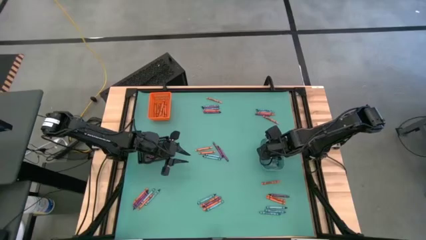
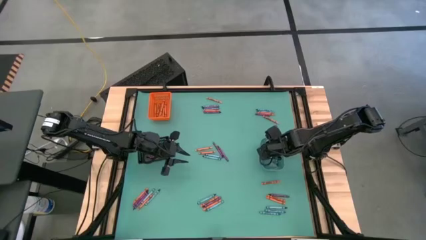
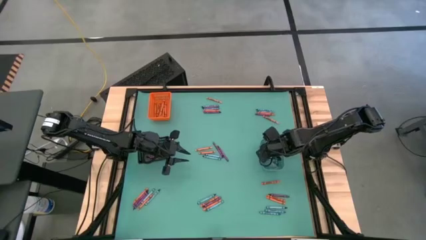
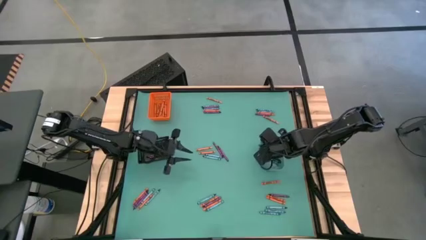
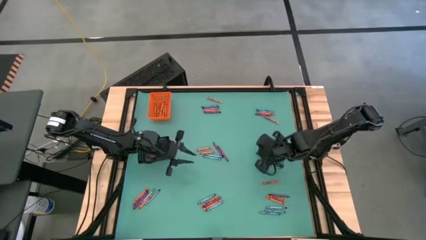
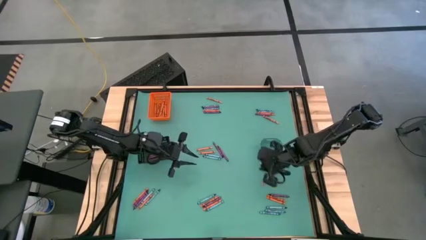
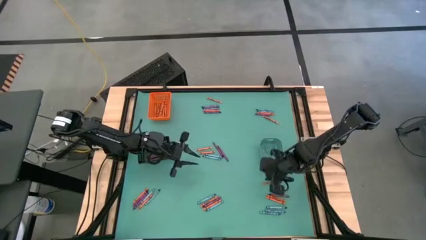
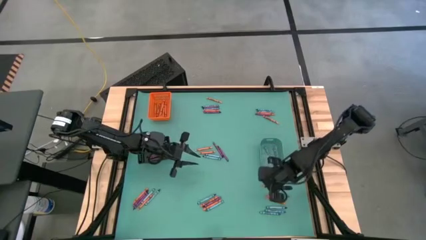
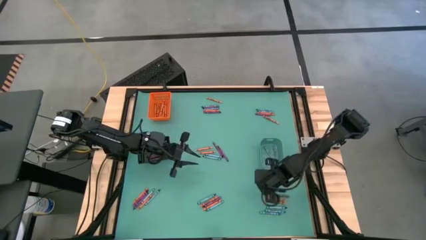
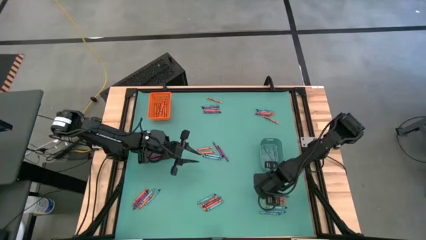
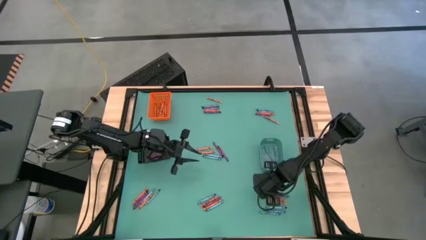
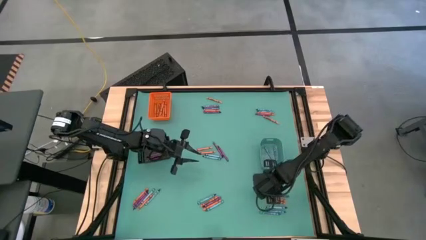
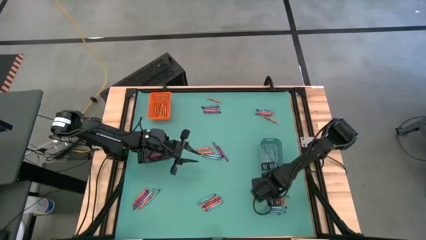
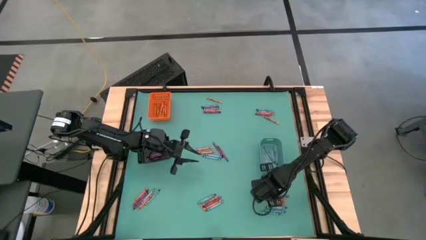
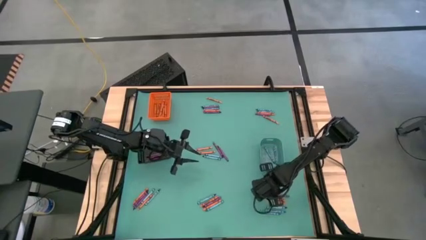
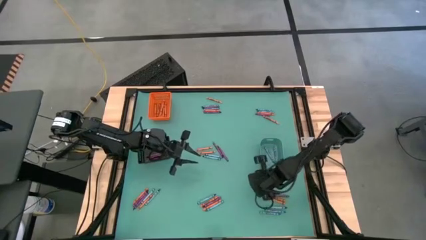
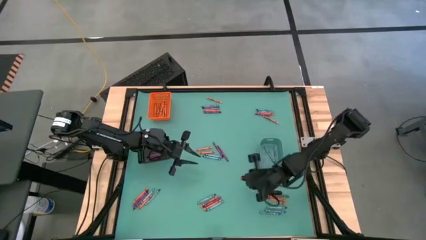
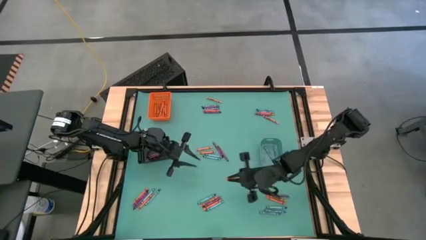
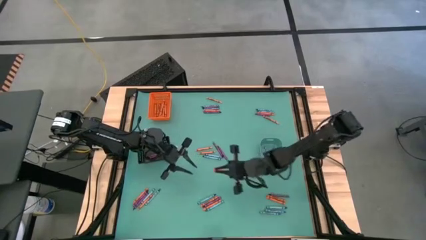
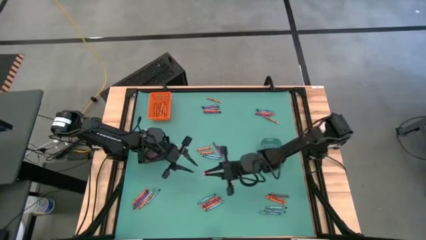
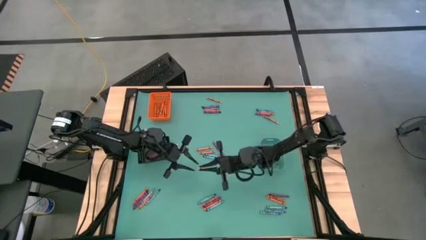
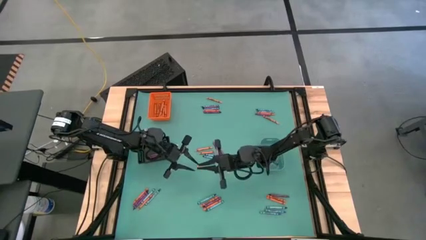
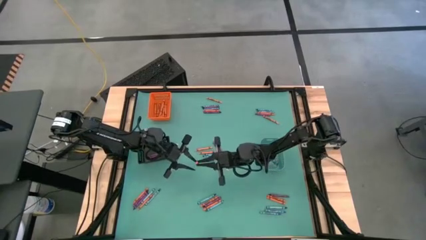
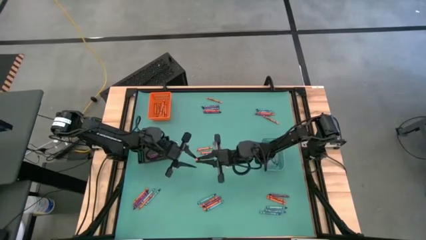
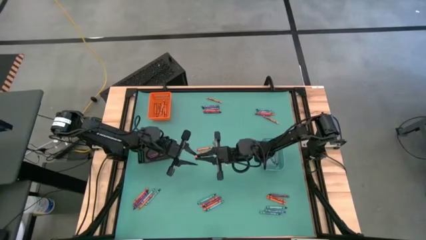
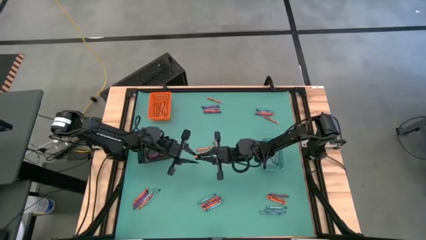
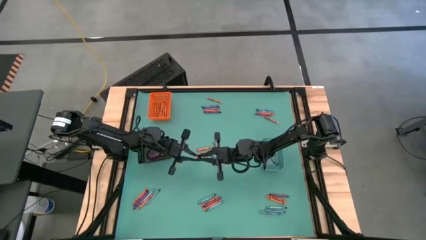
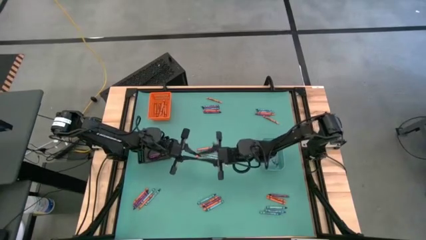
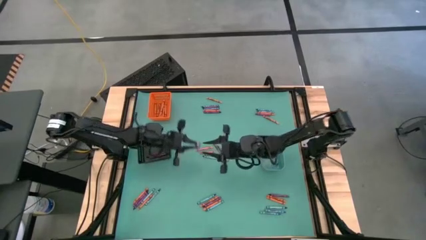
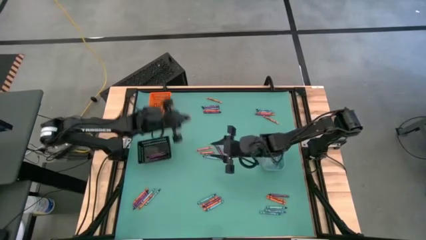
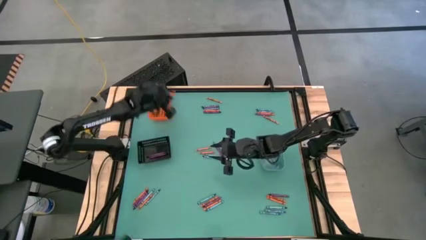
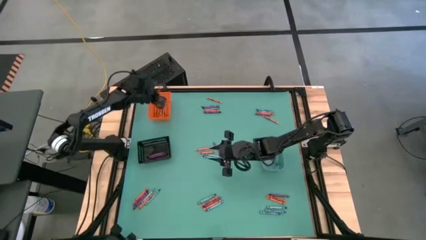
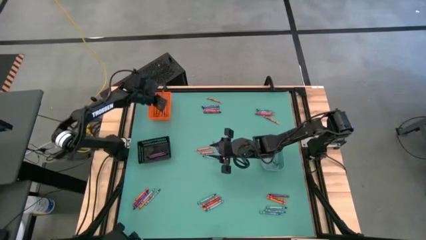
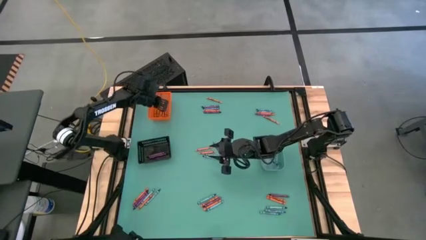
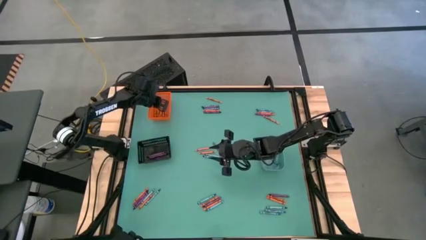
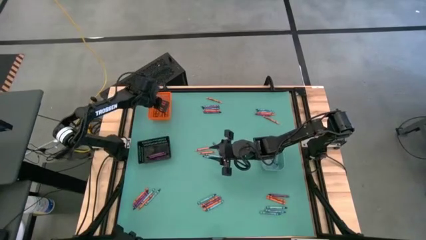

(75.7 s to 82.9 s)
Task: Sort crayons
Put the orange crayon into the orange bin

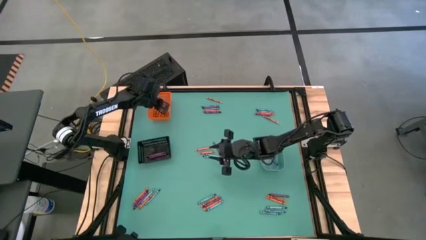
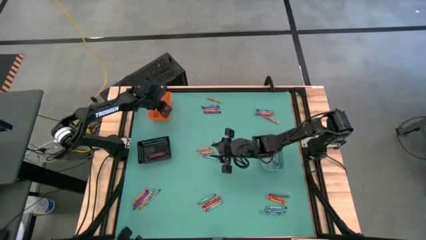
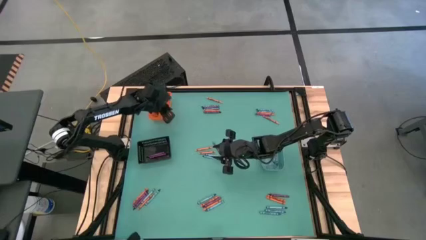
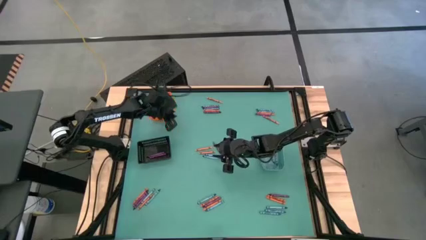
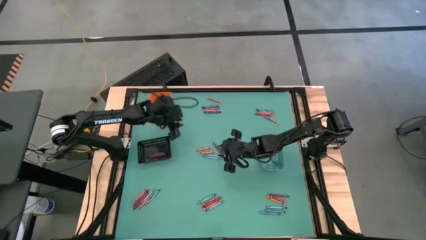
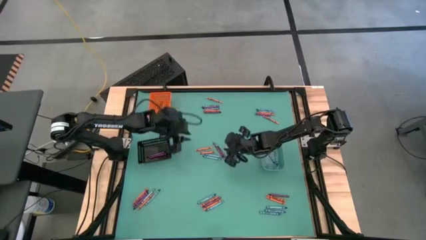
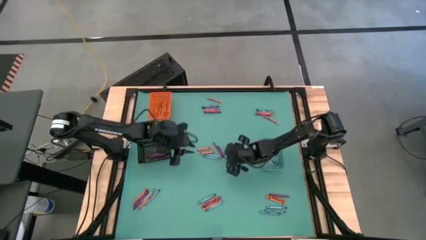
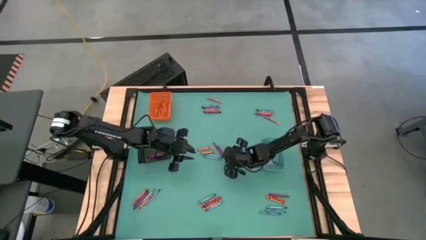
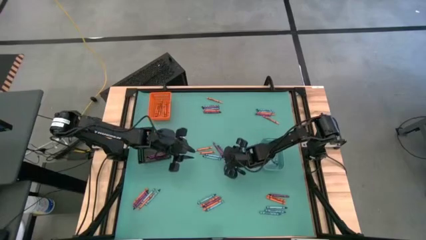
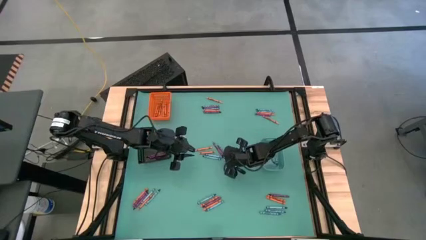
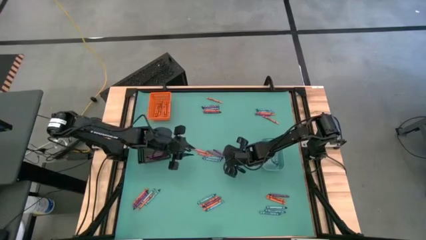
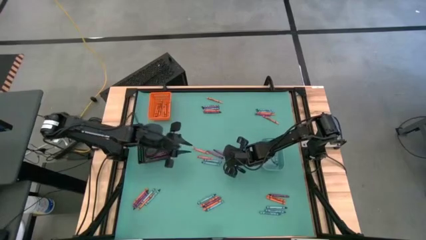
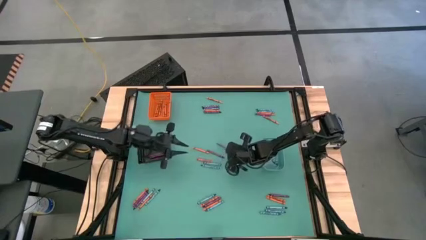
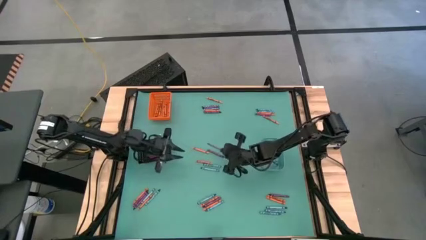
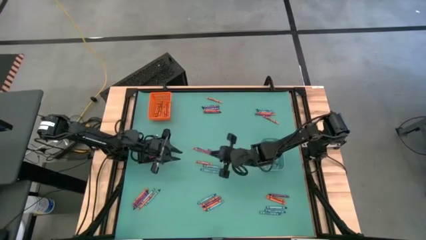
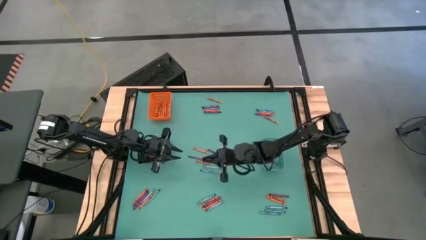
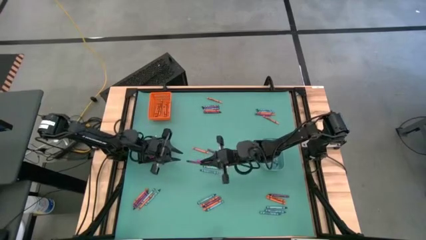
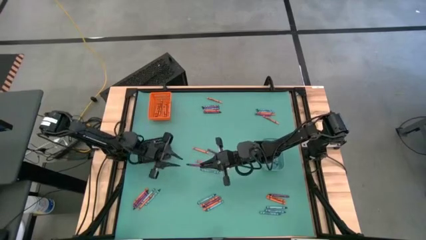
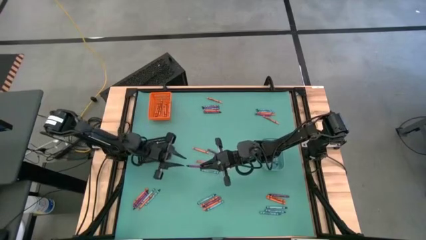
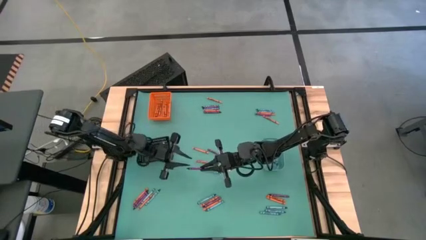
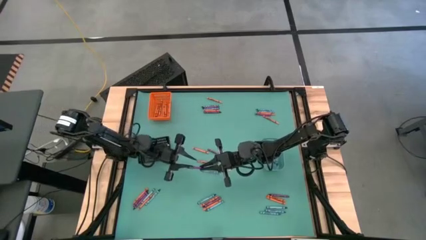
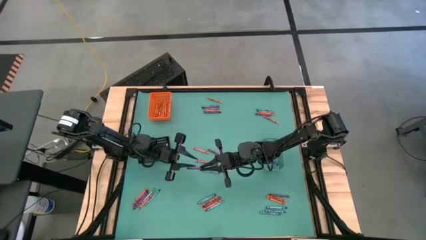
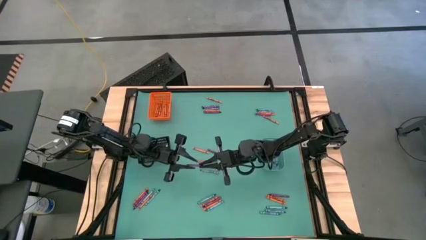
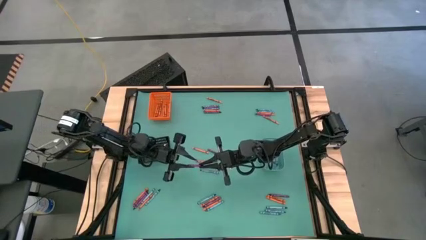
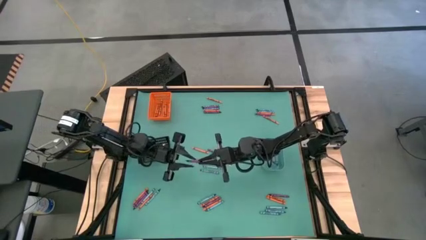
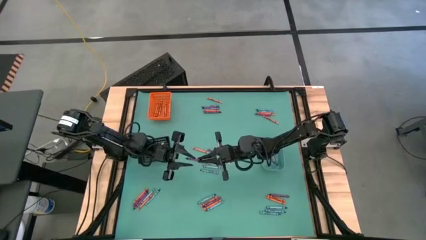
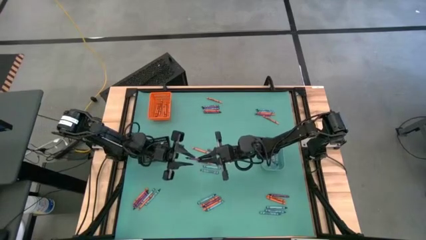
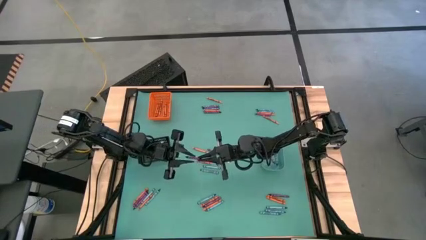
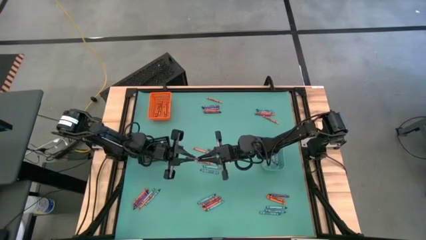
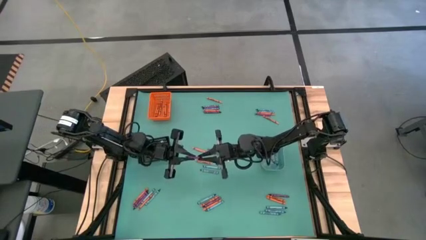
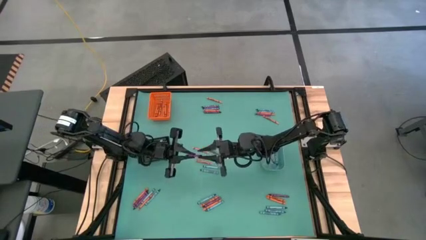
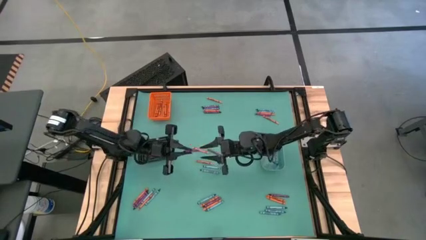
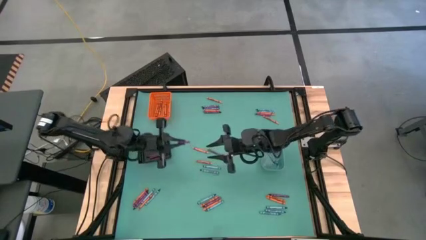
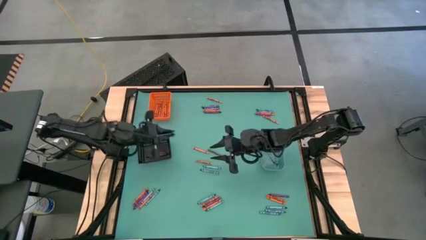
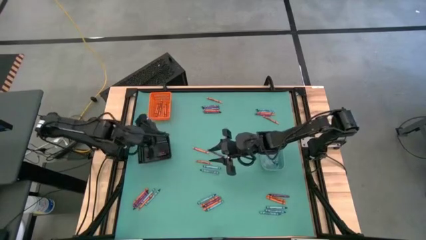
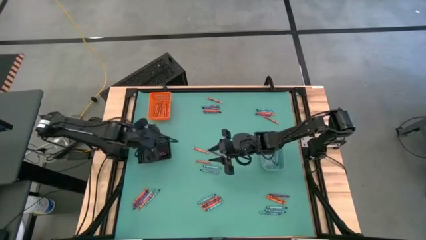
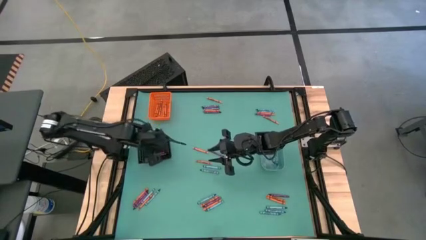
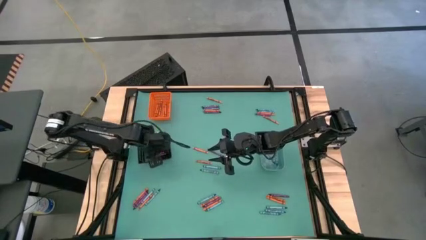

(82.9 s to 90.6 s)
Put the violet crayon into the black bin

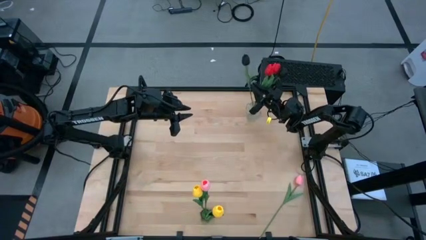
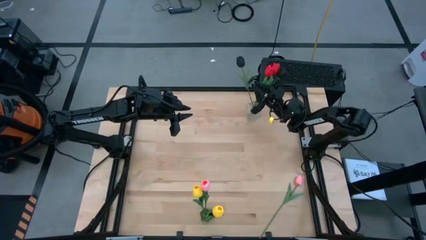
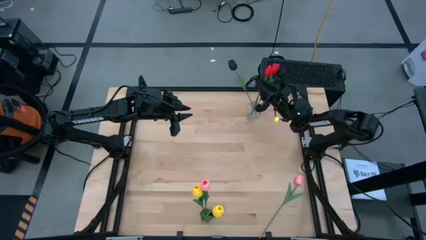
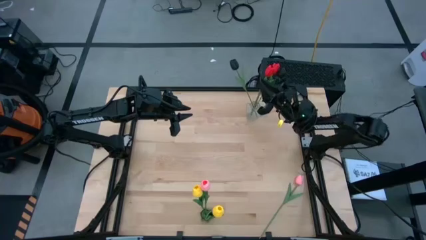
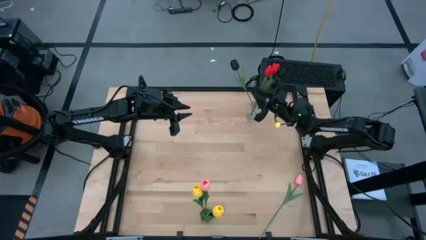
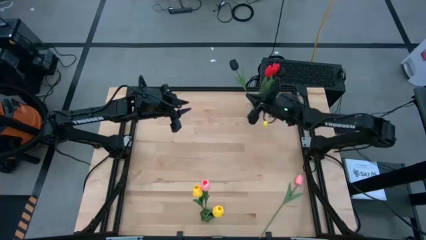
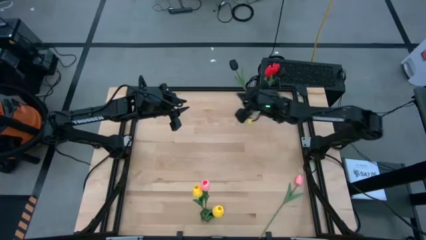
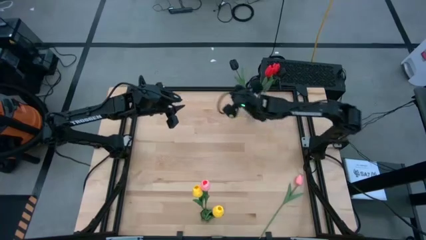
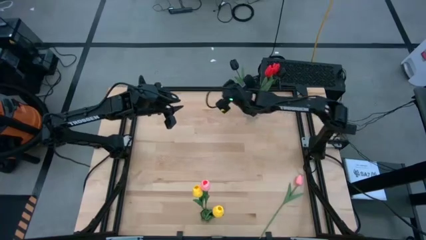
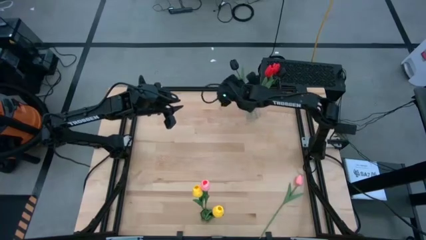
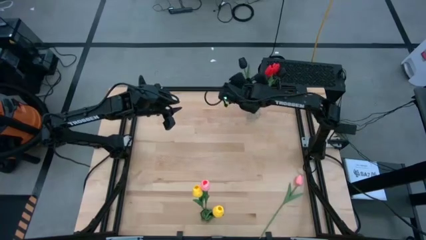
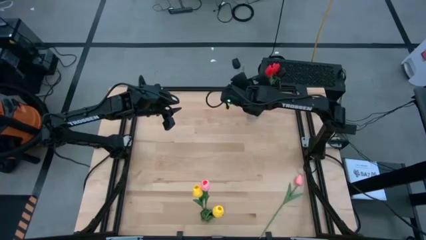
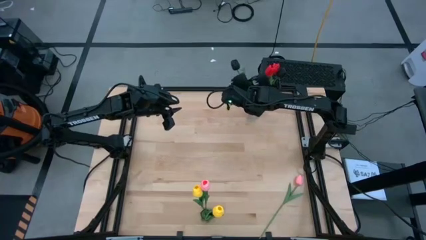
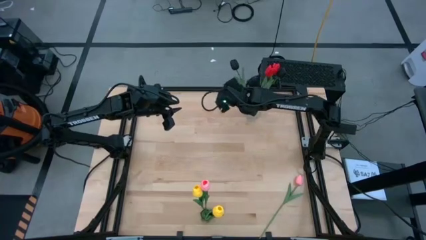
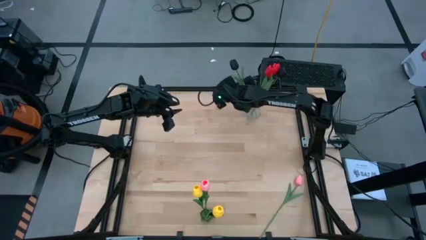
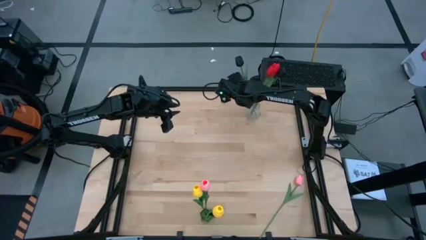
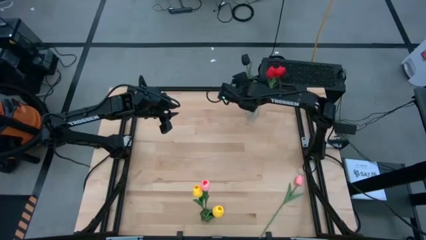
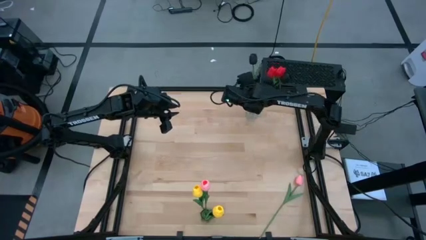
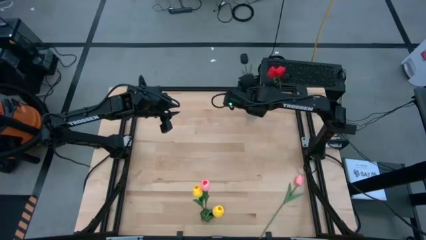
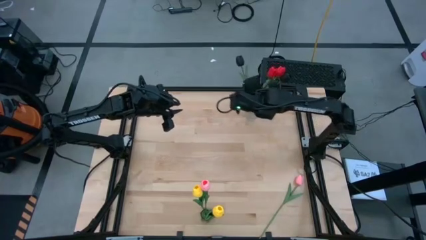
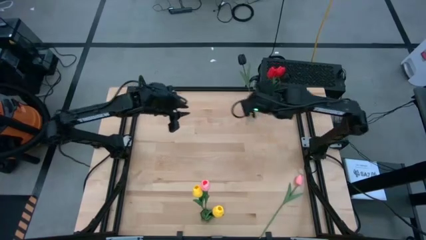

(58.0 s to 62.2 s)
Task: Sort flowers into vase by color
Adjust the black flower in the transparent vase
